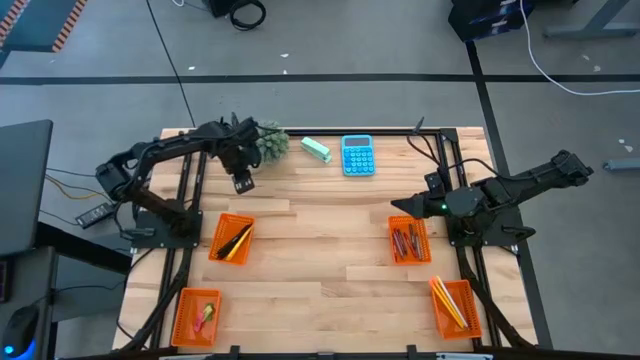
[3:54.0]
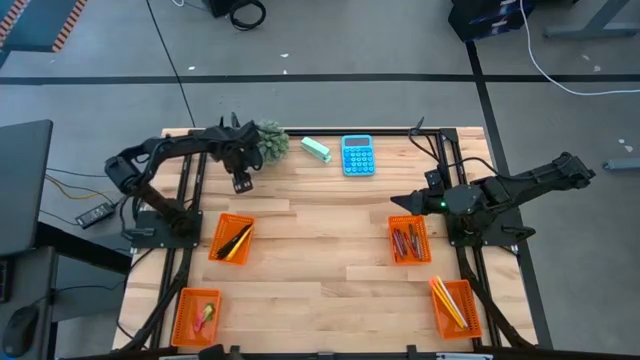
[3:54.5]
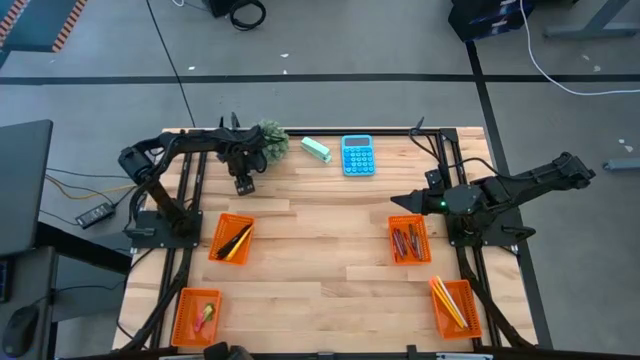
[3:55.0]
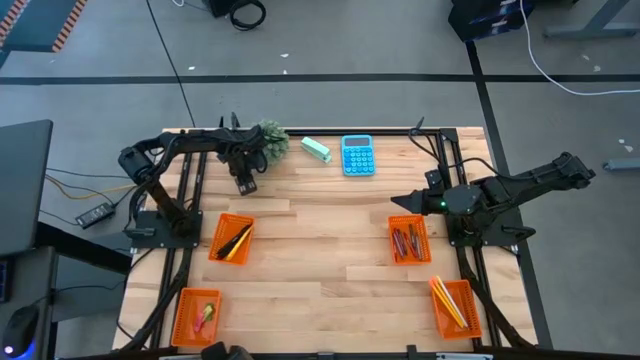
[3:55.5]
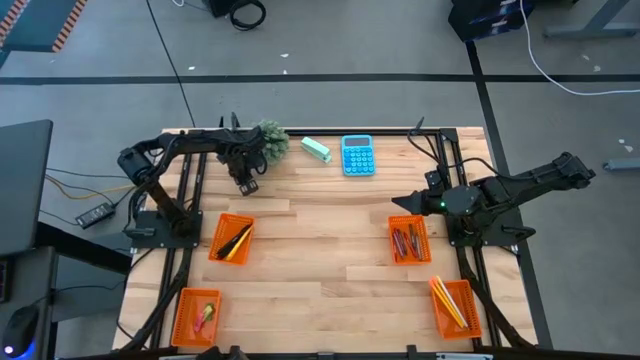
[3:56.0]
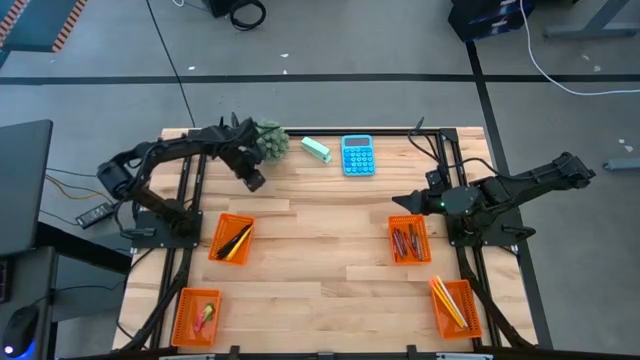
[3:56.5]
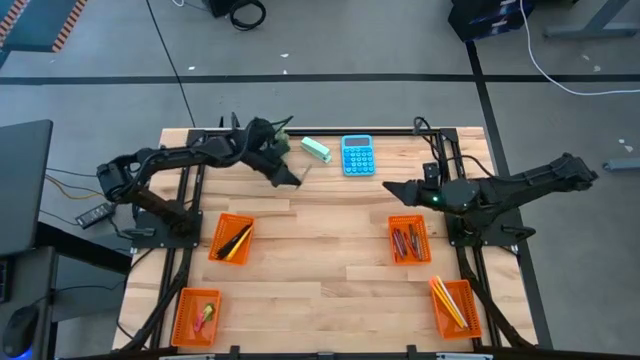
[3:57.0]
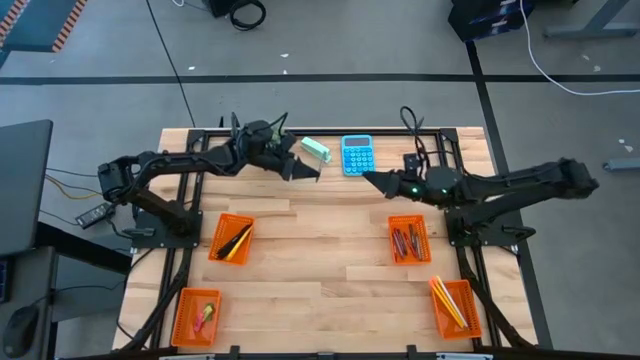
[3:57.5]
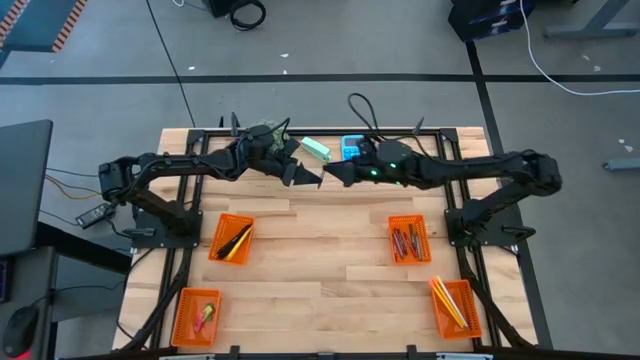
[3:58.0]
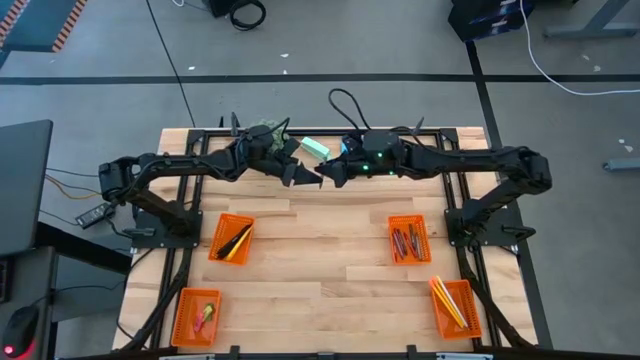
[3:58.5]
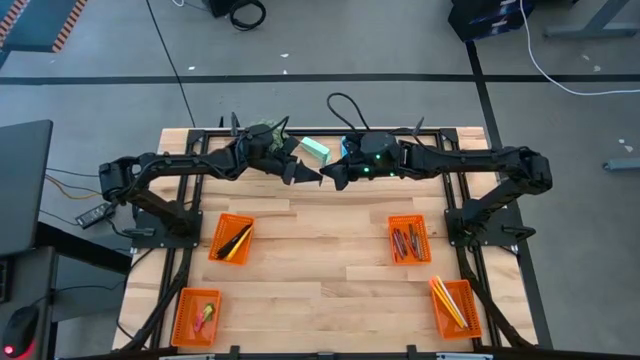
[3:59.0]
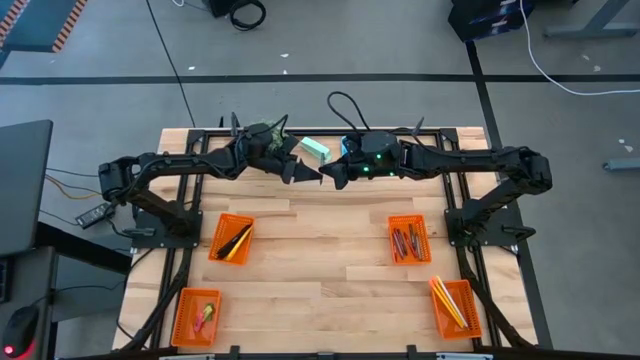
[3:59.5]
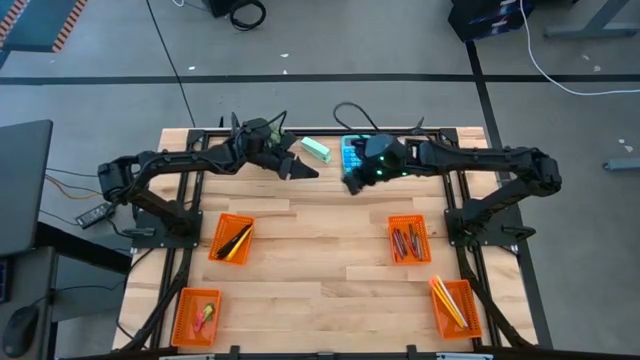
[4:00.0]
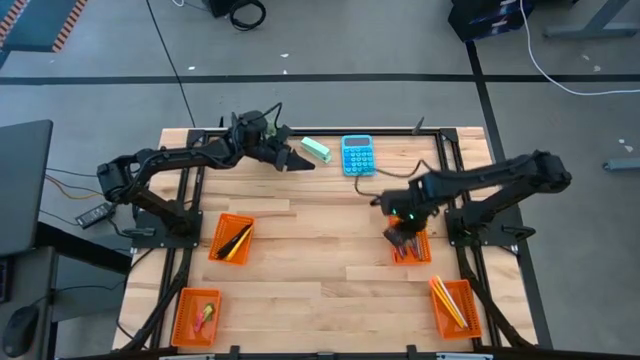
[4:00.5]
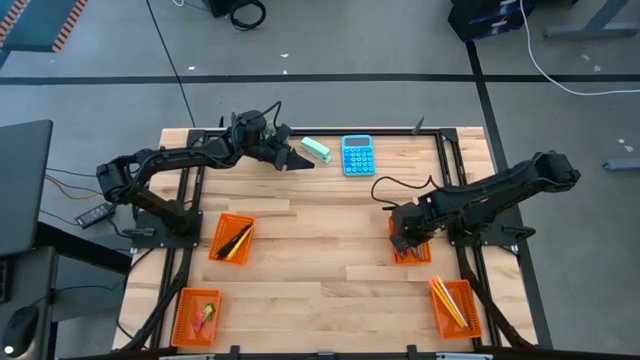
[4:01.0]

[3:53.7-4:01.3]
Task: Sort crayons/erasers/pens/pencils in bins
Put the gray crayon into the top right orange basket

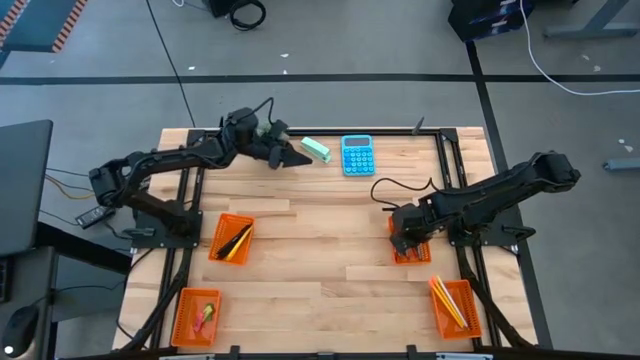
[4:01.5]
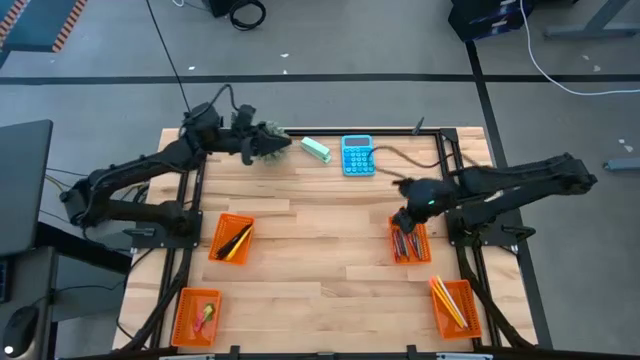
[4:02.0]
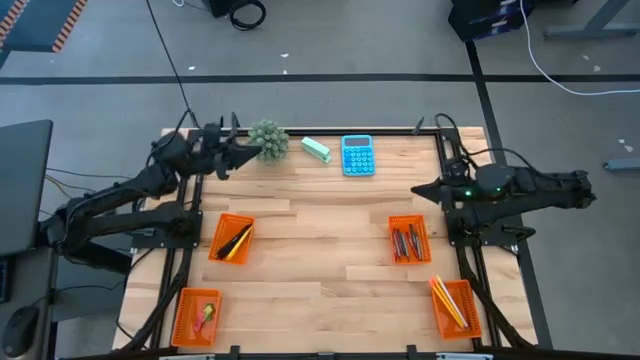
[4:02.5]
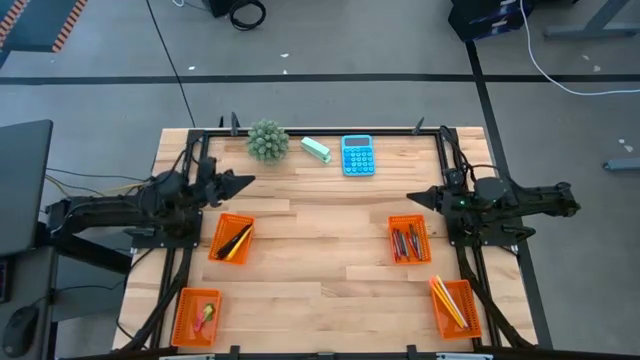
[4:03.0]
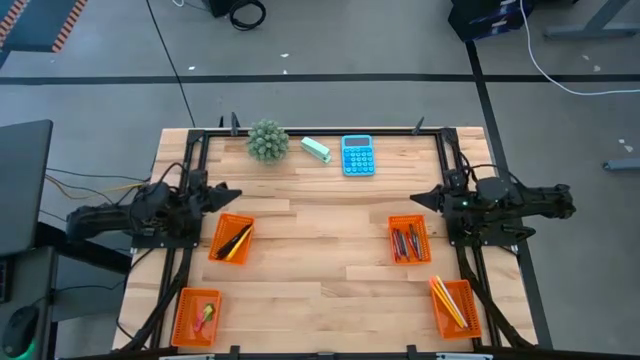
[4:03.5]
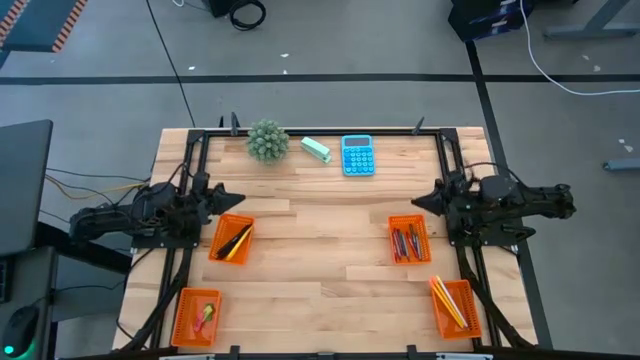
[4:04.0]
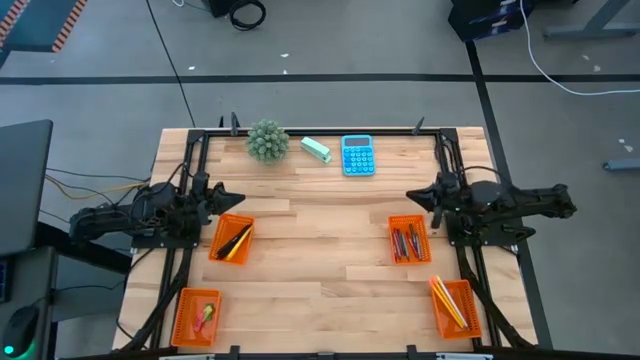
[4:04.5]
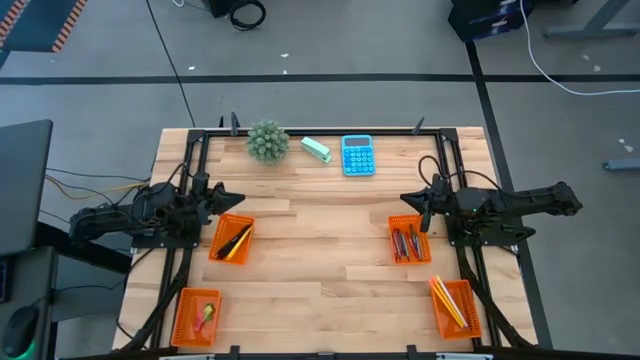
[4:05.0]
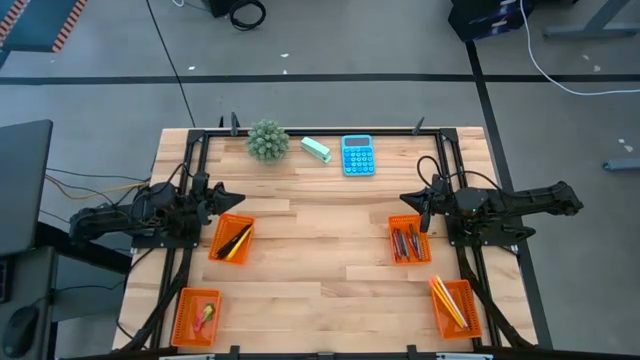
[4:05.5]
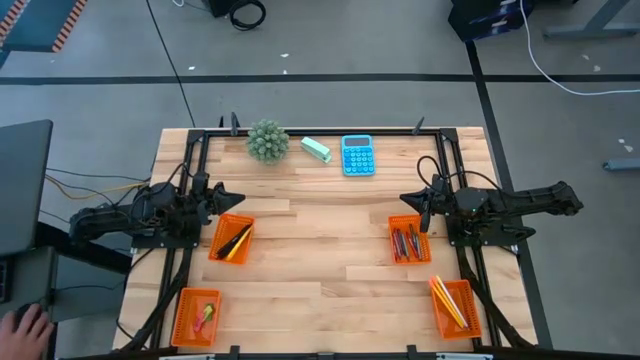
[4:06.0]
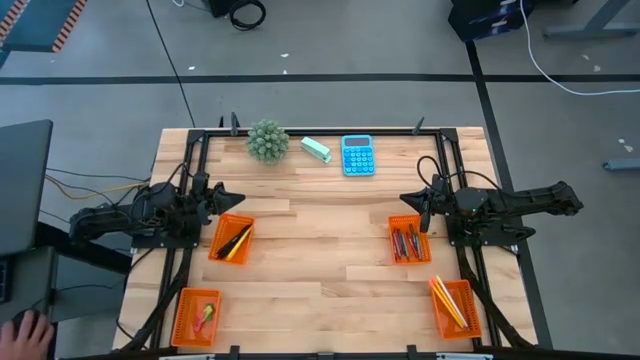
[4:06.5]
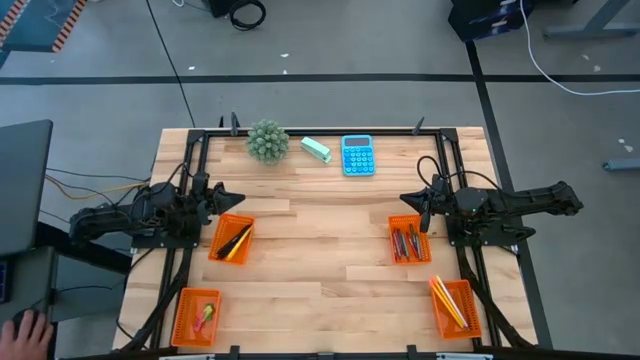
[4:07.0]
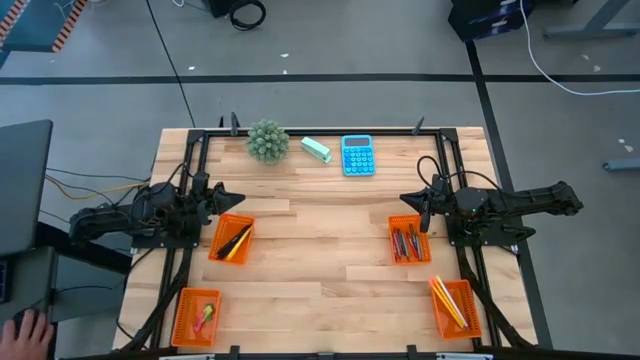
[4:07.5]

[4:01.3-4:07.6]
Return to Home Position

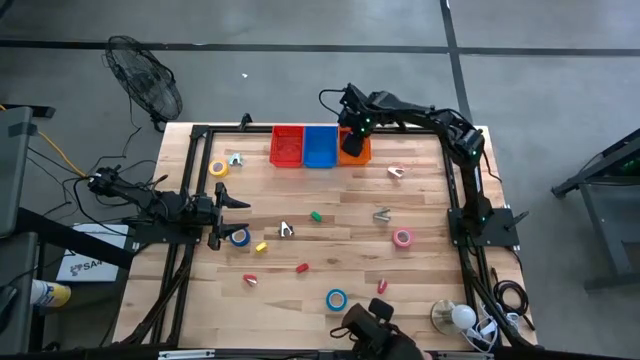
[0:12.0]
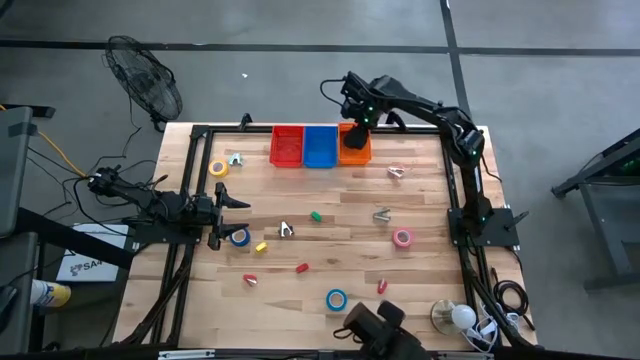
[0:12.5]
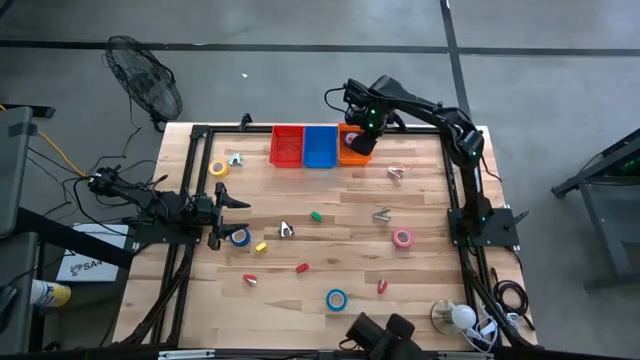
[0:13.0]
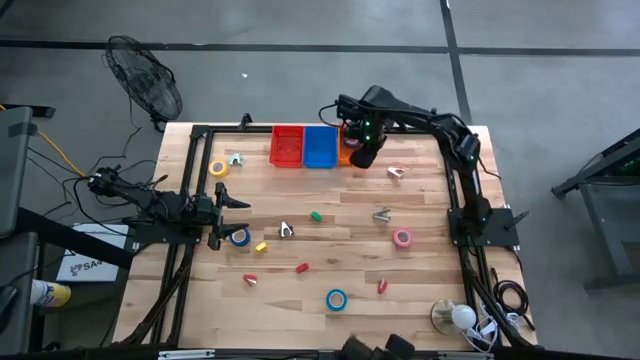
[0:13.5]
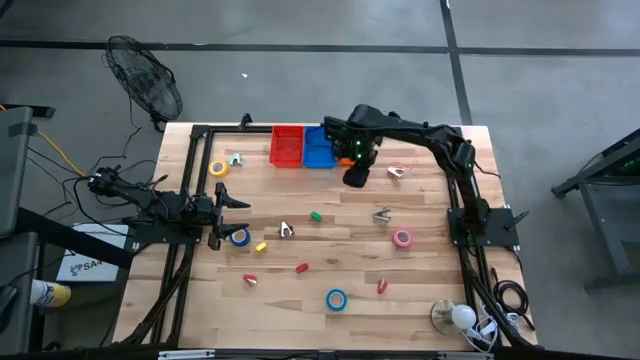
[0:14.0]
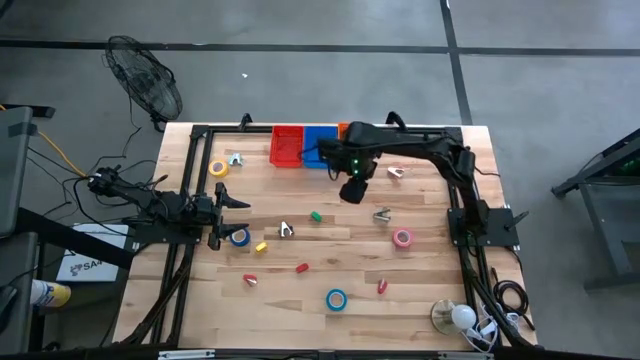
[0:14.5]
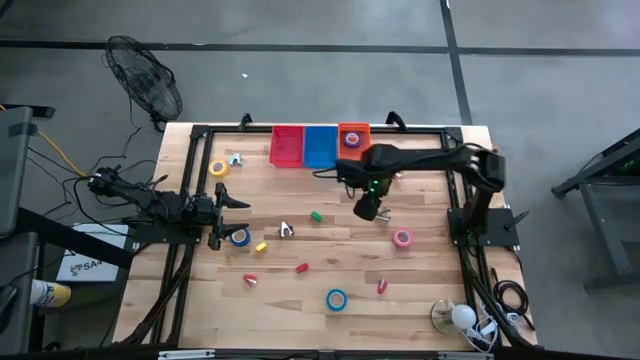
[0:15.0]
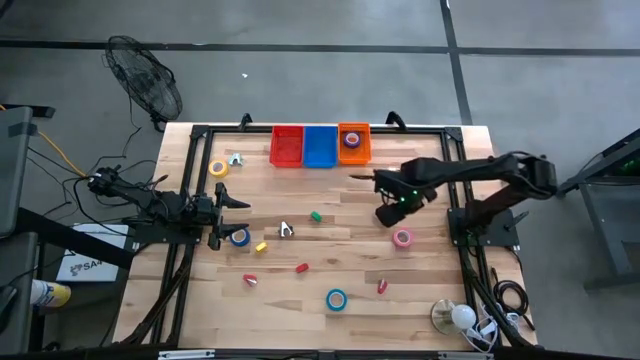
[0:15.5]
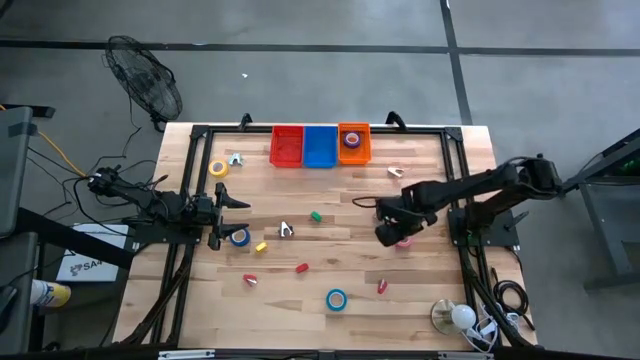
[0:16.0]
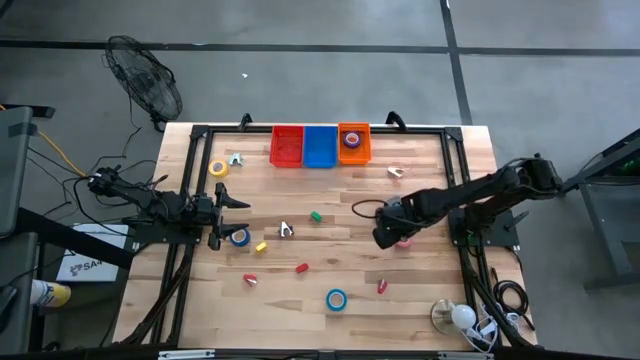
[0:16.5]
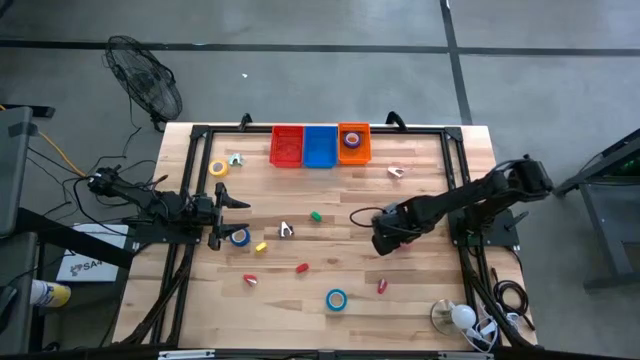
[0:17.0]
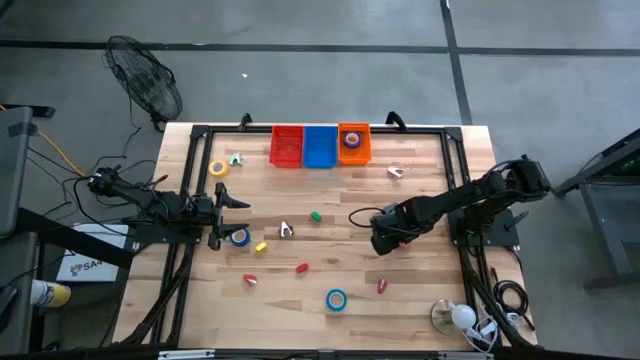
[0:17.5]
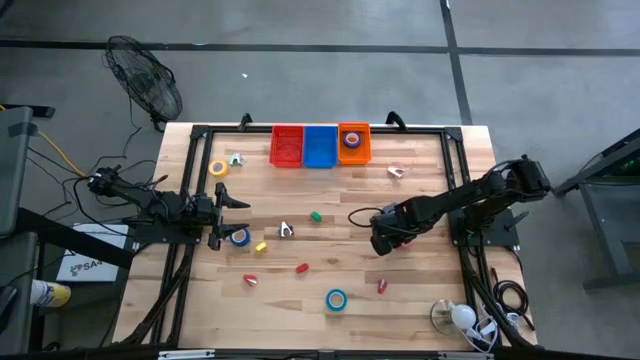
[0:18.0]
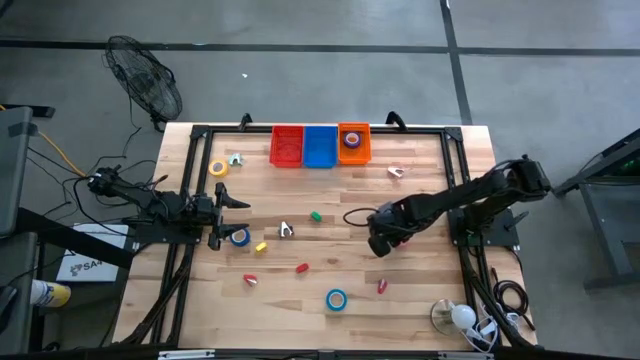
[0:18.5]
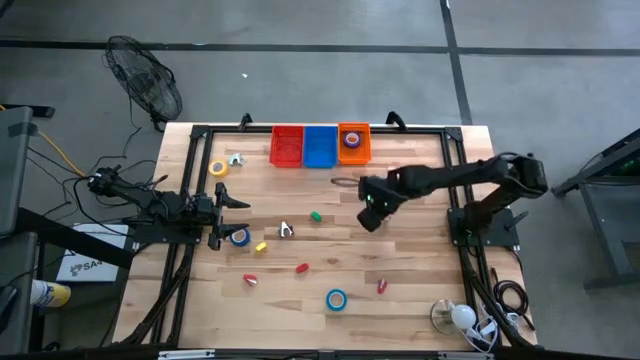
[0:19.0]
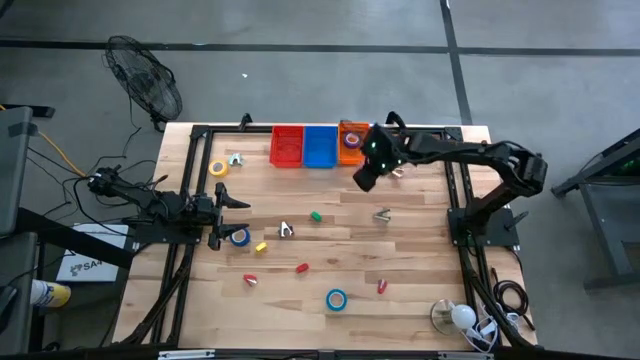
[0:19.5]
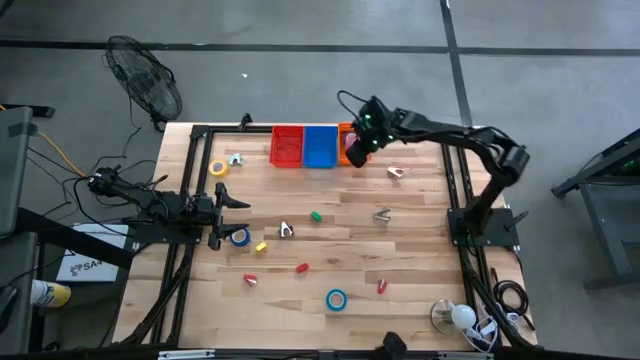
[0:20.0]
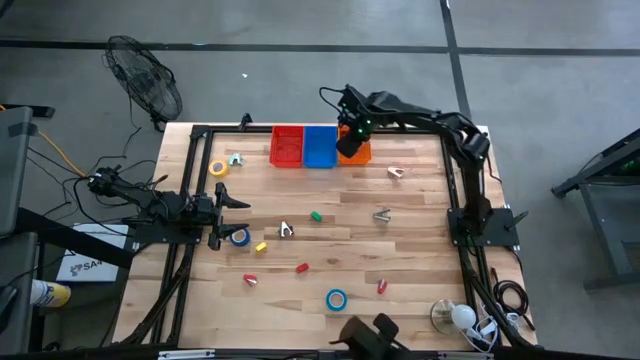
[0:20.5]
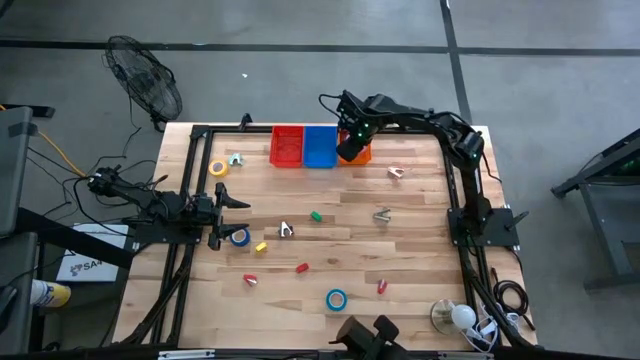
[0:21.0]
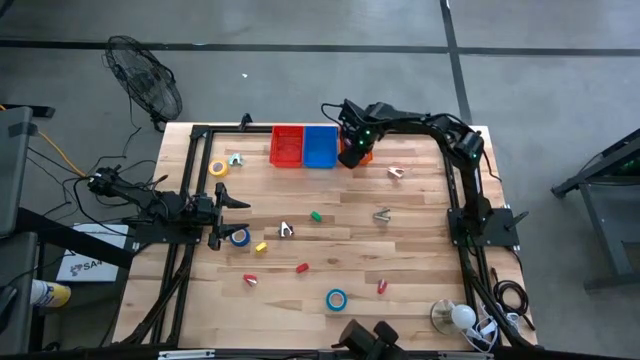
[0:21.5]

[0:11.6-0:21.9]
Task: Pick and place Stapler, Stapler remover, tape
Put the pink tape into the orange bin
